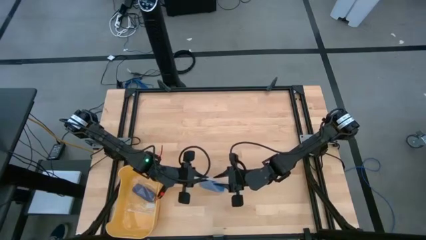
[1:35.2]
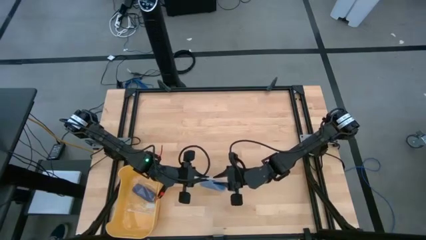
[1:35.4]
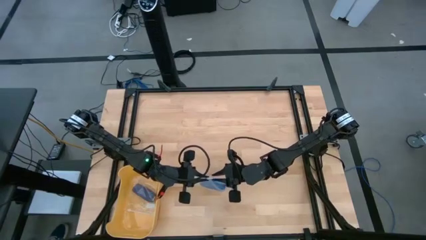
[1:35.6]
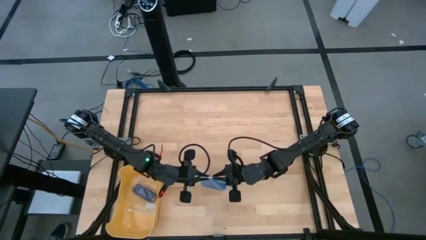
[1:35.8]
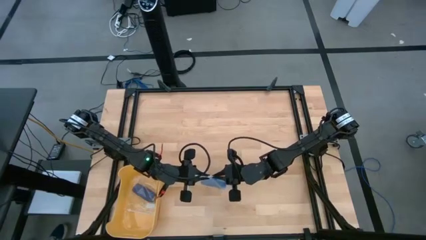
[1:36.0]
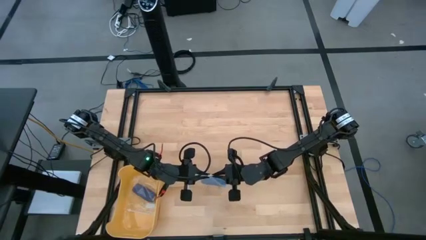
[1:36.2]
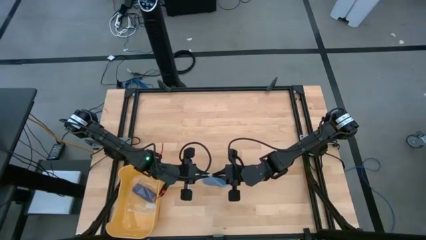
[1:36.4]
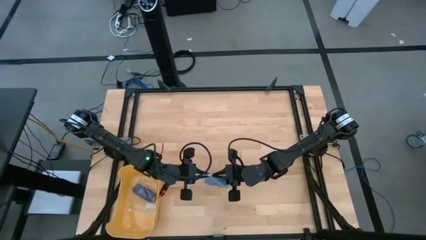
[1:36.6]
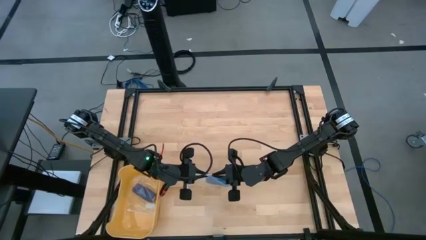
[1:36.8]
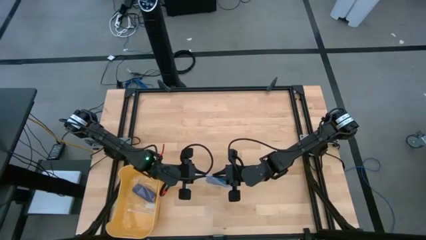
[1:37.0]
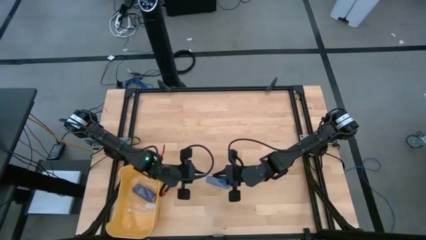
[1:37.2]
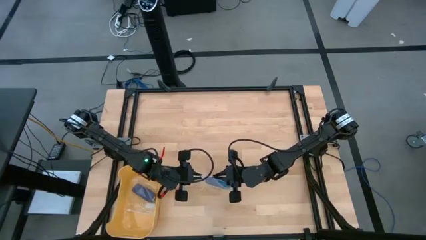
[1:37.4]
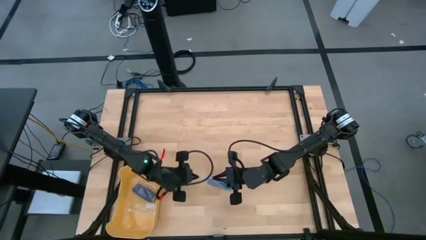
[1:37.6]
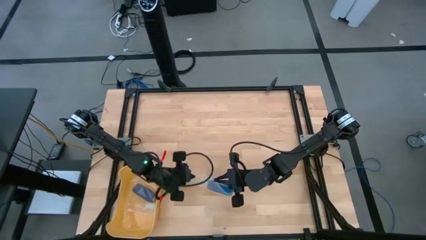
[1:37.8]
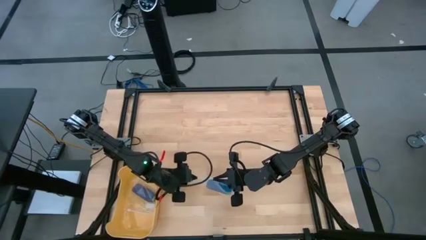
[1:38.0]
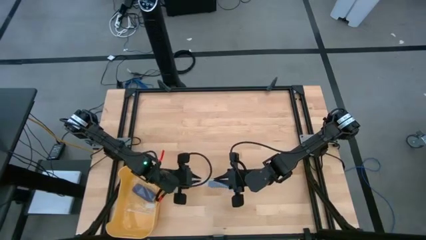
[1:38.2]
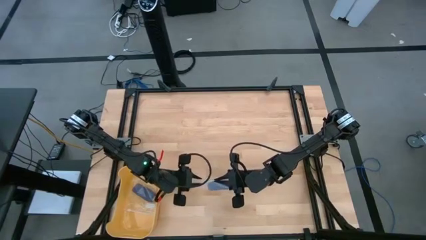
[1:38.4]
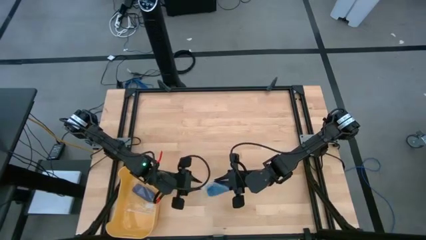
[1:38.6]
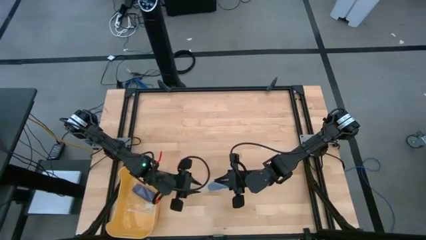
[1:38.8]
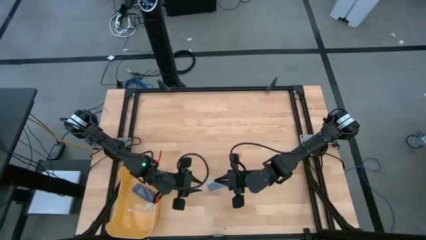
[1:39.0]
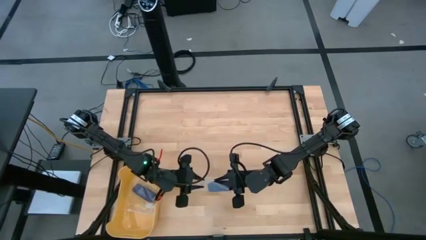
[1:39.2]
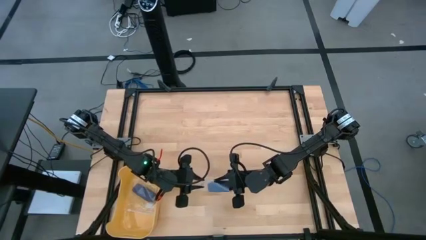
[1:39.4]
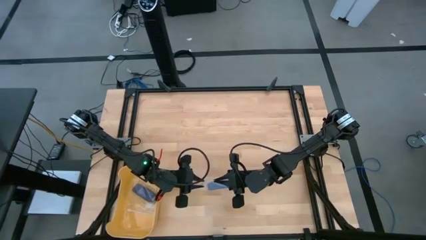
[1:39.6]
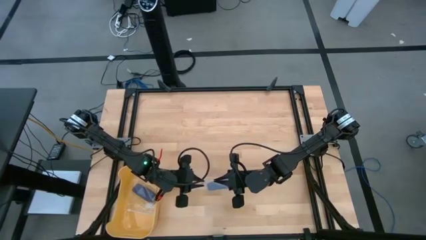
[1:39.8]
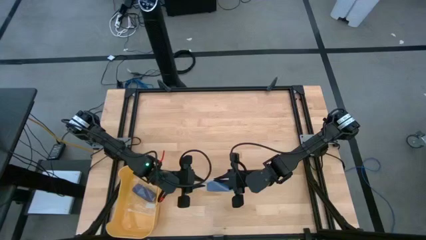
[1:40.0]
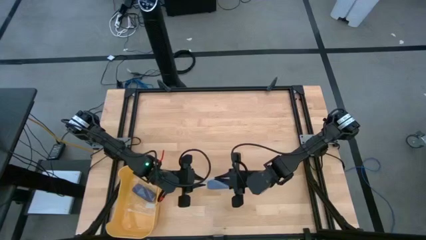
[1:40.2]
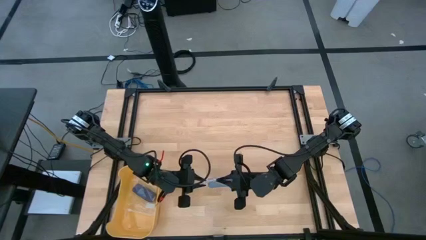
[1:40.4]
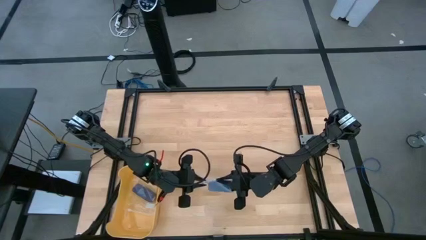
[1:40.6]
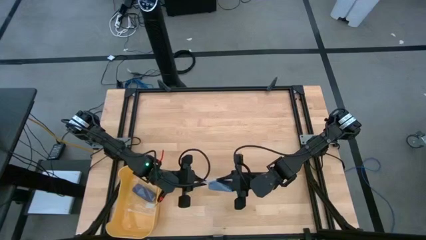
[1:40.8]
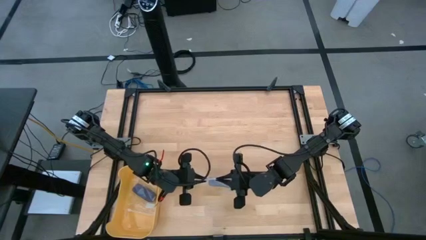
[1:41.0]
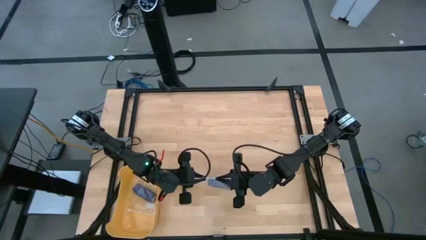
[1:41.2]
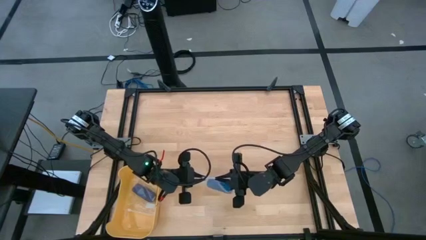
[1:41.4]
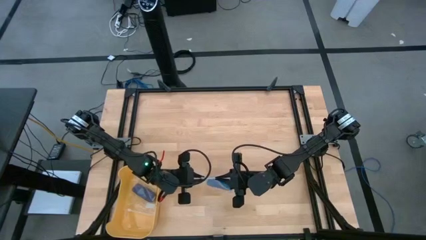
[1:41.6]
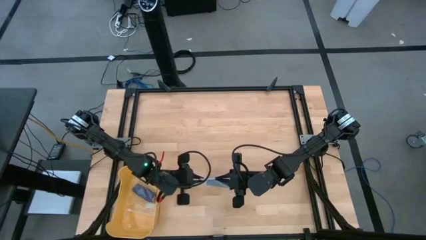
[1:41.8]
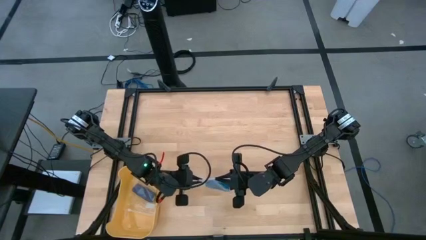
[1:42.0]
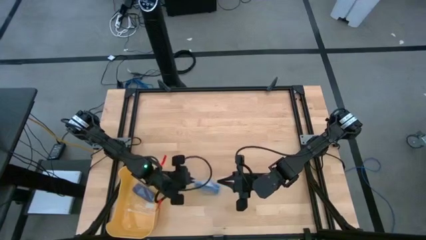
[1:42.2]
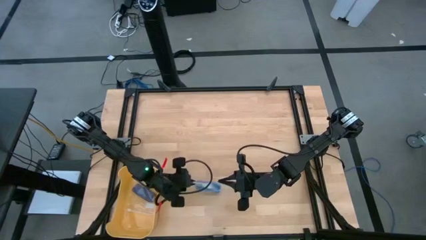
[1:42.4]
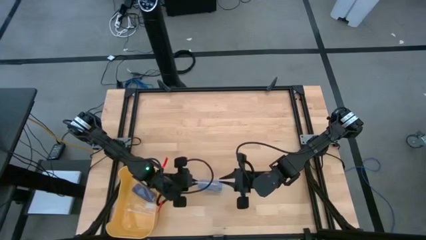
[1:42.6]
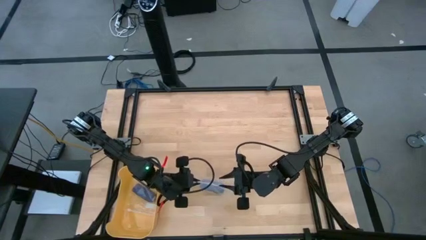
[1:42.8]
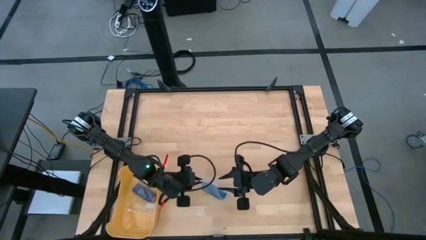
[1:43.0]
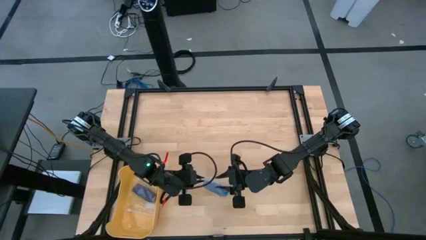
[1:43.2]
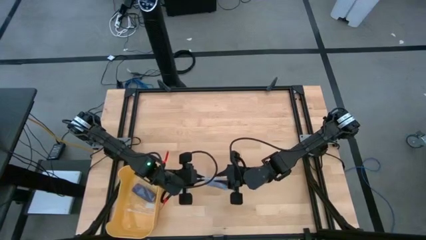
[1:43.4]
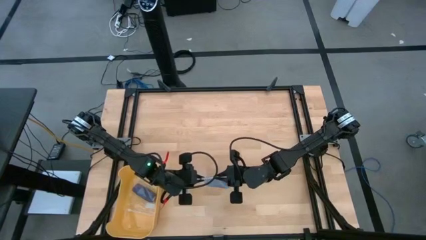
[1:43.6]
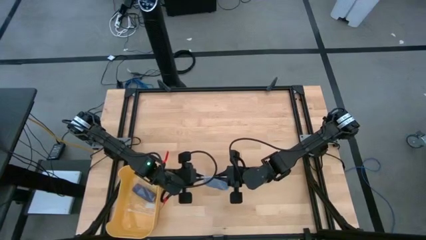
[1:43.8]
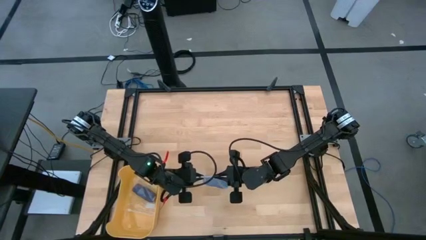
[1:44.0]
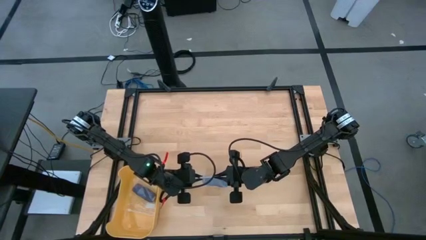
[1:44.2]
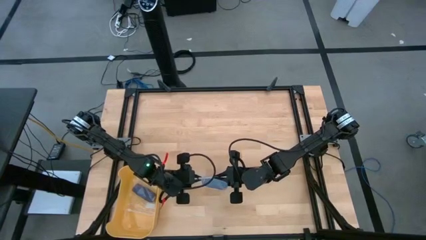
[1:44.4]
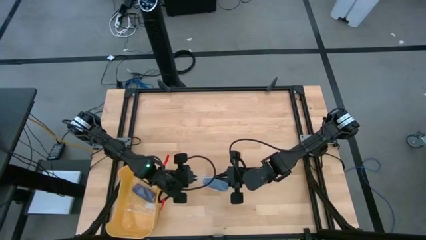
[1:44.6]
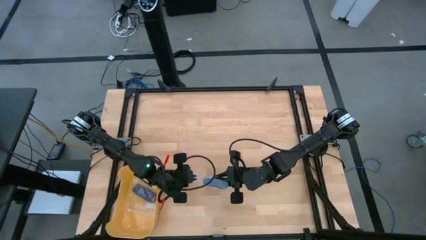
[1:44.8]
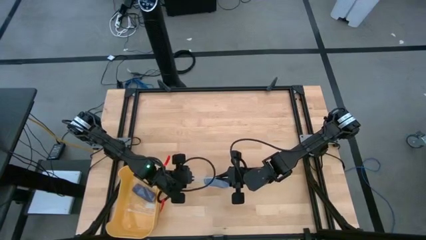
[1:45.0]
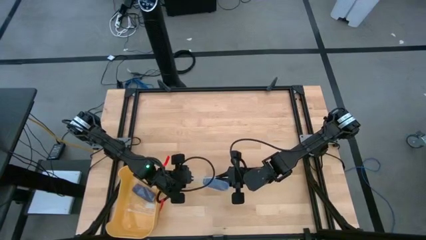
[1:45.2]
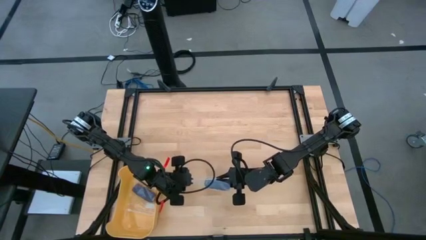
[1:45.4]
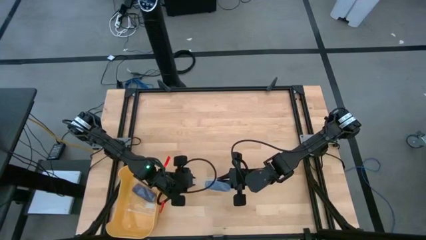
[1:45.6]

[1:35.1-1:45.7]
Task: Roll bandage
Close the transparent zip bag

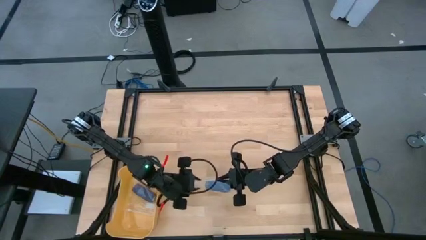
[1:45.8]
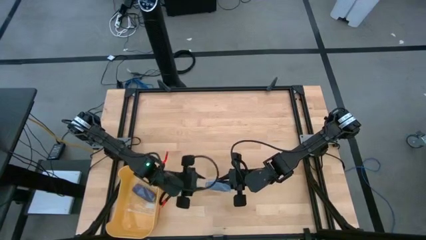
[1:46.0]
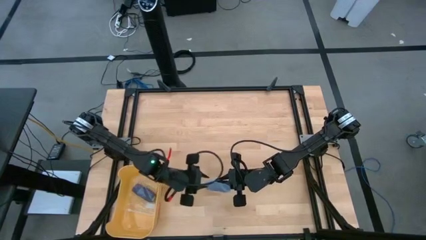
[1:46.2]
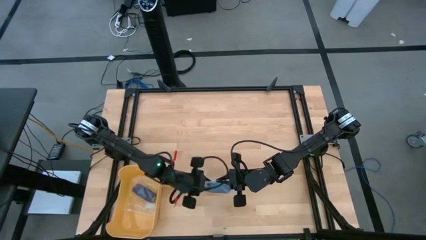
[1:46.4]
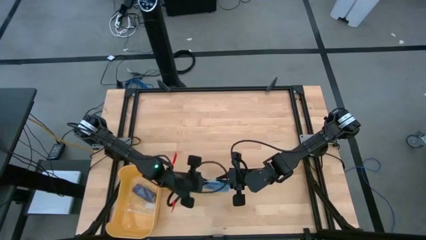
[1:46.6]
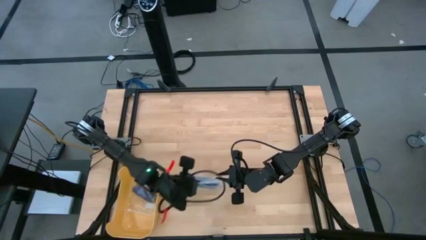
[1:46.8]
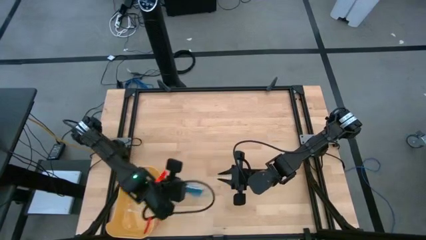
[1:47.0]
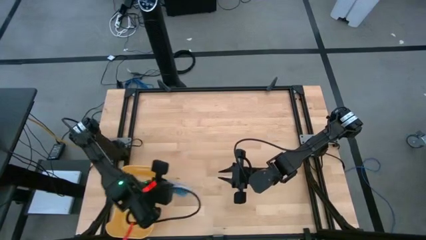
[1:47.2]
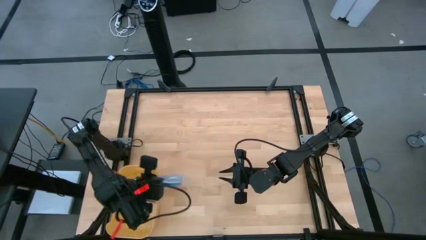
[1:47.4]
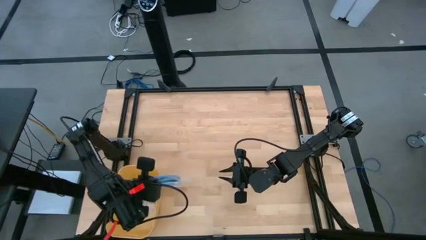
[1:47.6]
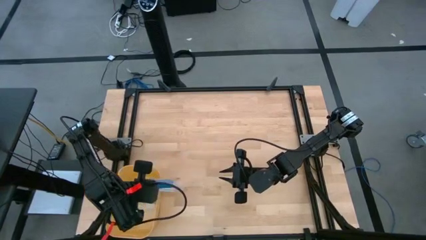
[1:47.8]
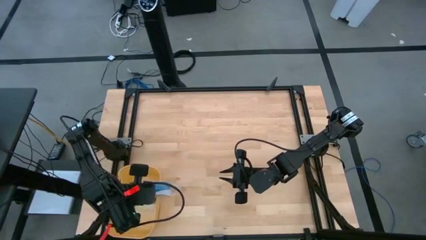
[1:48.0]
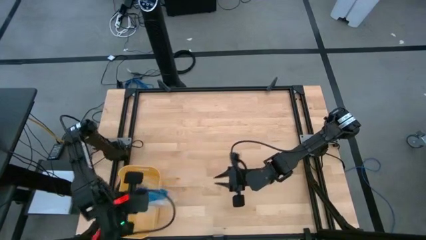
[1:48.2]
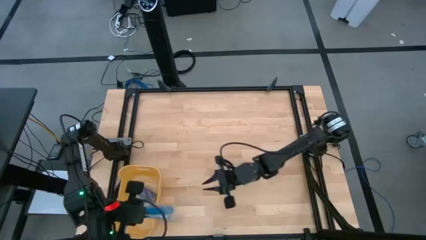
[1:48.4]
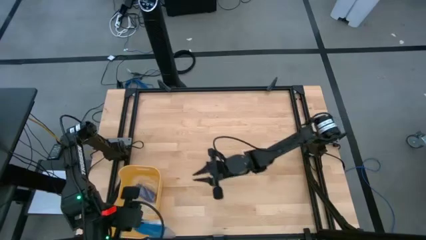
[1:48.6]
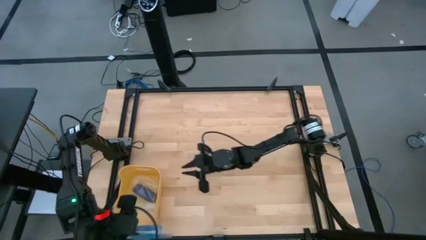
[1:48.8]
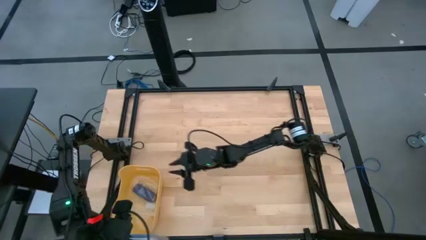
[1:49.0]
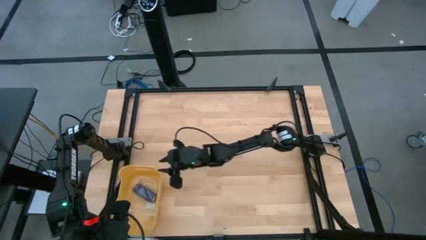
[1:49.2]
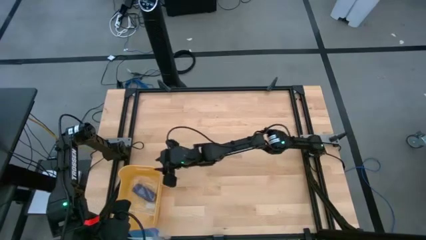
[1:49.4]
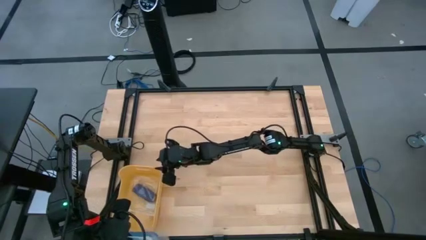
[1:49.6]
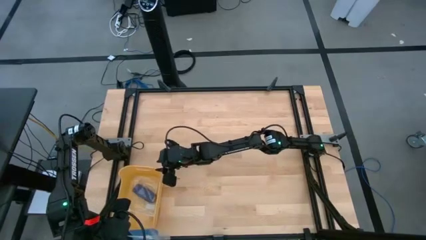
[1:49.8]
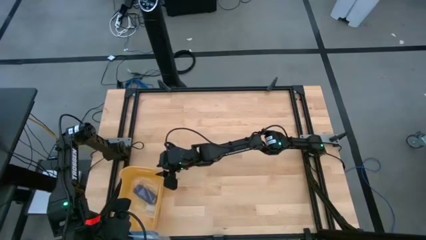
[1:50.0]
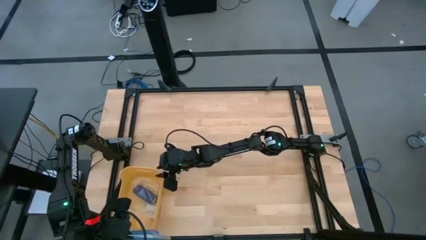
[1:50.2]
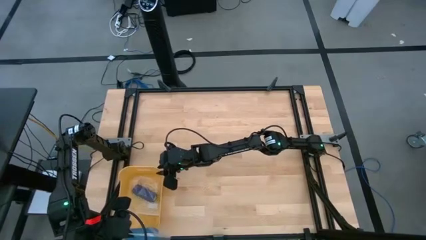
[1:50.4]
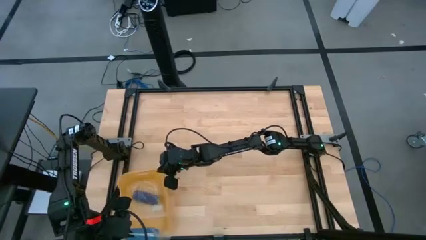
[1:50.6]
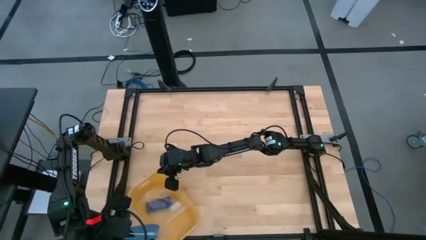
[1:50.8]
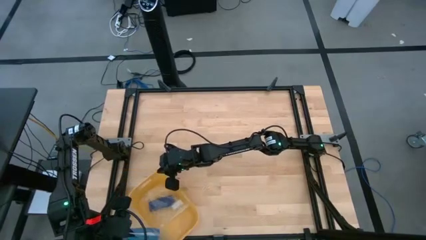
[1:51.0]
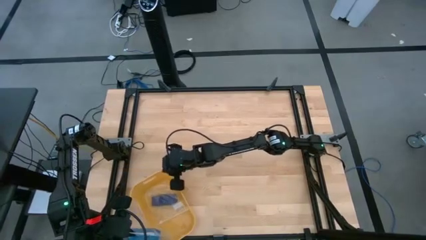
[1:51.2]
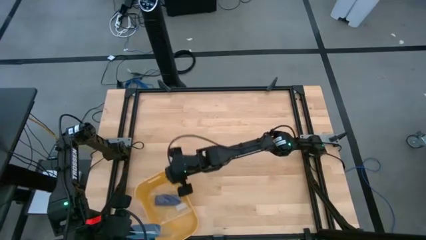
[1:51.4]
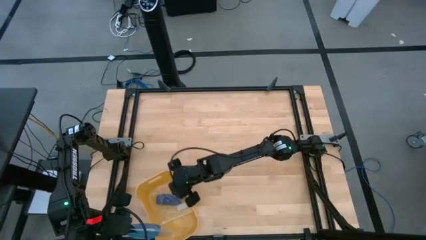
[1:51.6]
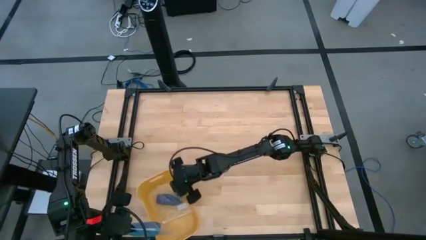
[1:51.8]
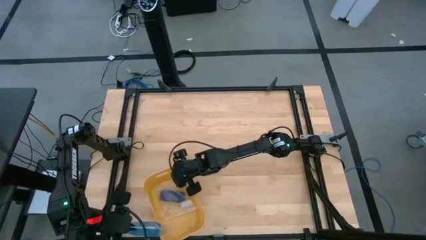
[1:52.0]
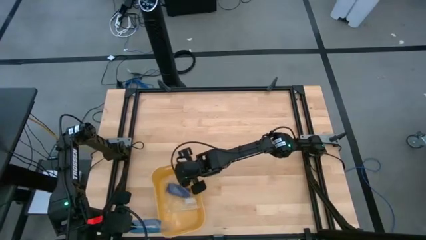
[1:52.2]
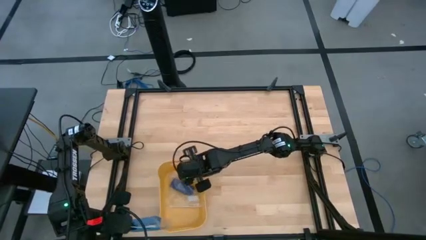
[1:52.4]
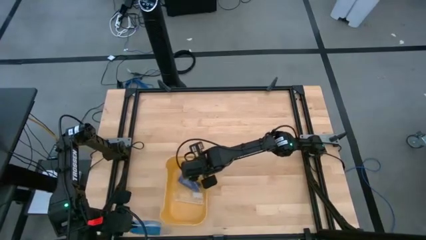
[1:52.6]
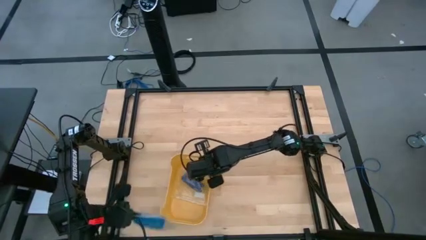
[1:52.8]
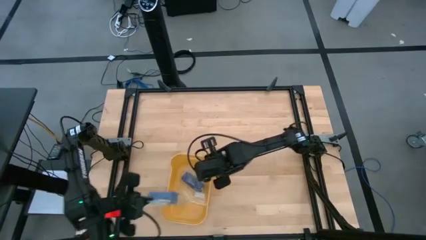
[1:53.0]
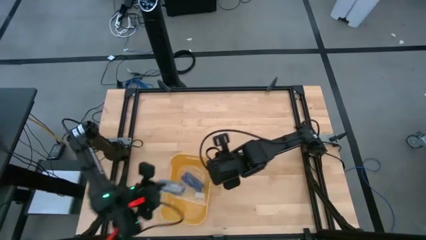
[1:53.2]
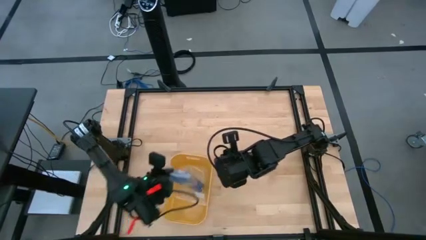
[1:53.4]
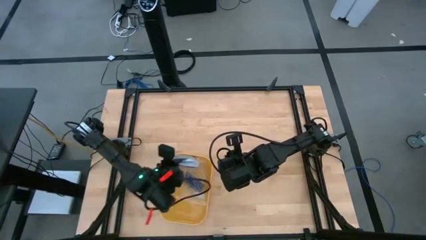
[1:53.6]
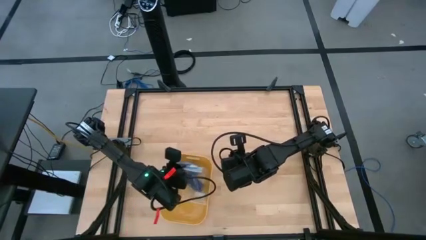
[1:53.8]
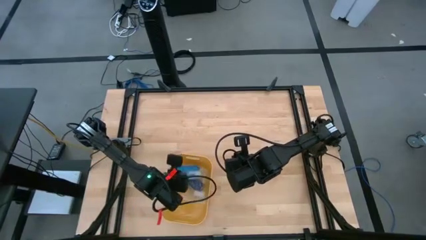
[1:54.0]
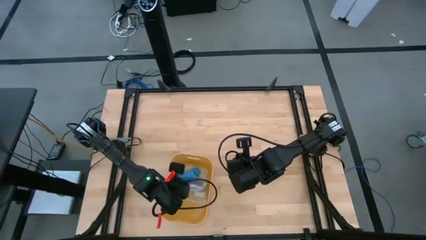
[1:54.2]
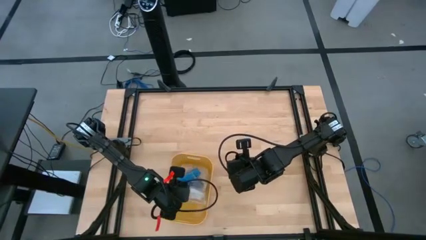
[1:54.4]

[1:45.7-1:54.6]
Put the transparent zip bag with the blue bandage into the yellow bin
